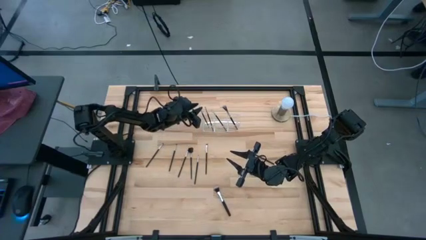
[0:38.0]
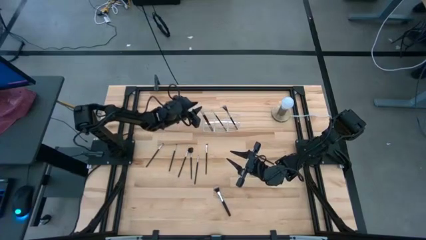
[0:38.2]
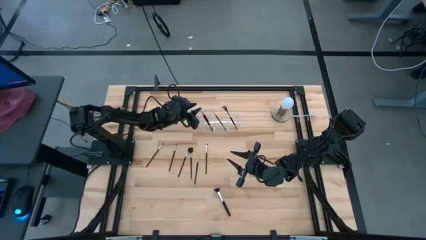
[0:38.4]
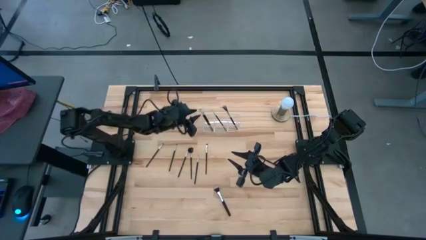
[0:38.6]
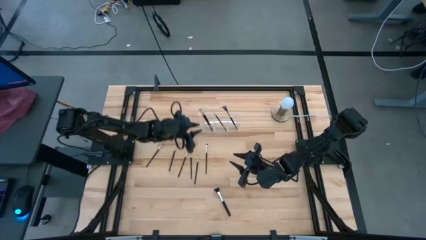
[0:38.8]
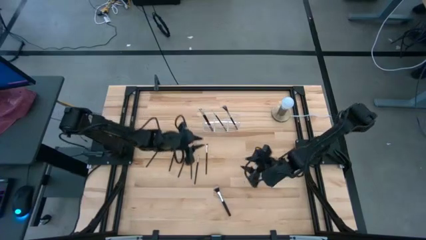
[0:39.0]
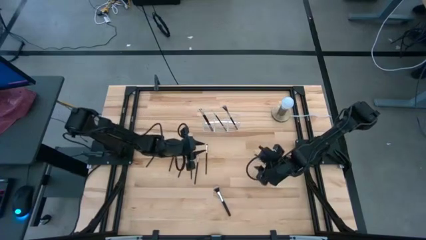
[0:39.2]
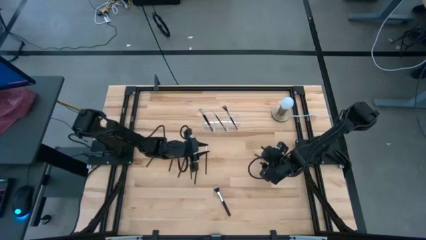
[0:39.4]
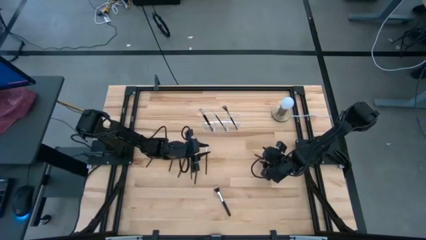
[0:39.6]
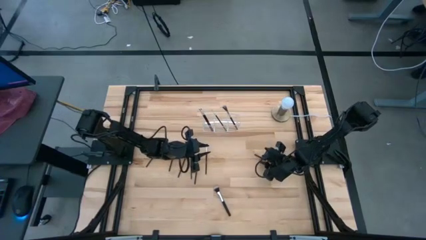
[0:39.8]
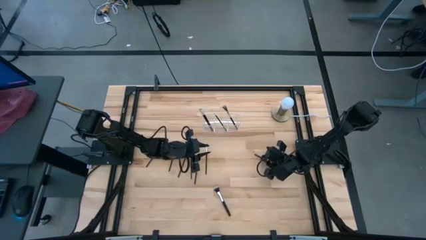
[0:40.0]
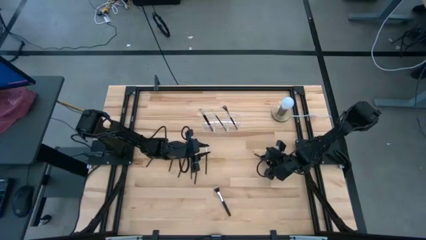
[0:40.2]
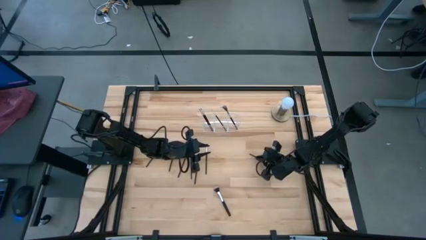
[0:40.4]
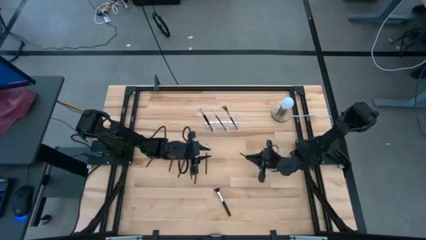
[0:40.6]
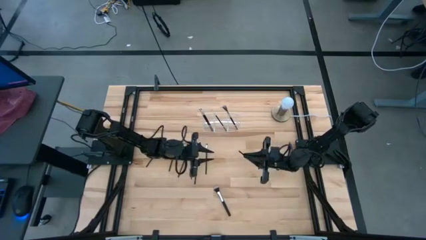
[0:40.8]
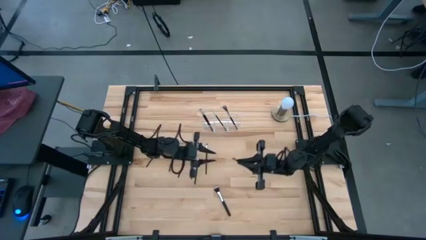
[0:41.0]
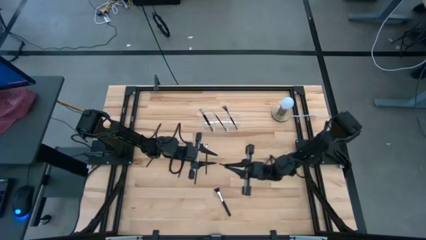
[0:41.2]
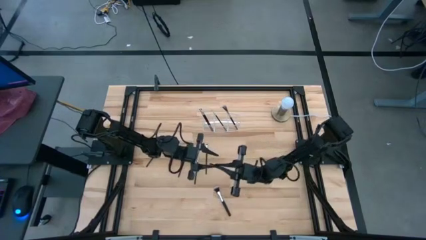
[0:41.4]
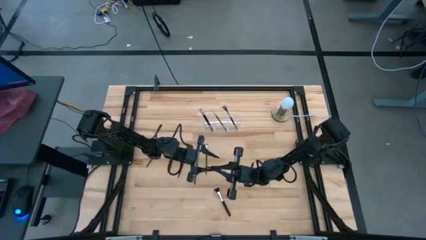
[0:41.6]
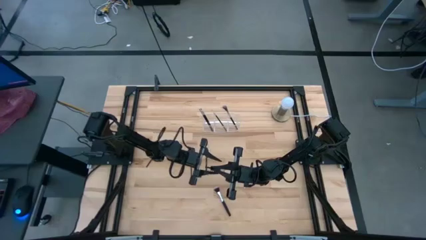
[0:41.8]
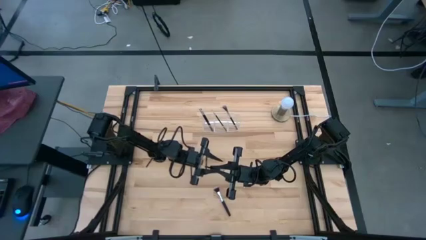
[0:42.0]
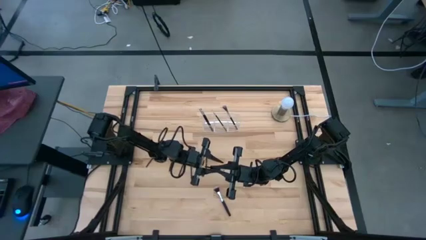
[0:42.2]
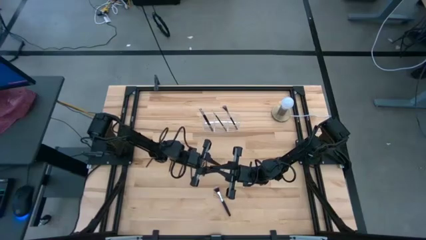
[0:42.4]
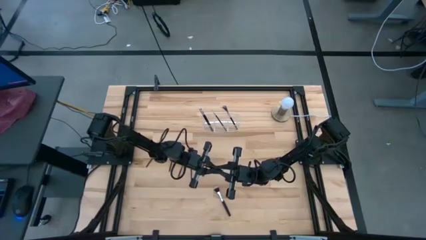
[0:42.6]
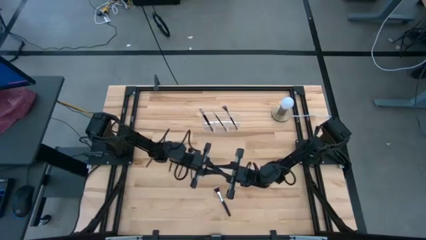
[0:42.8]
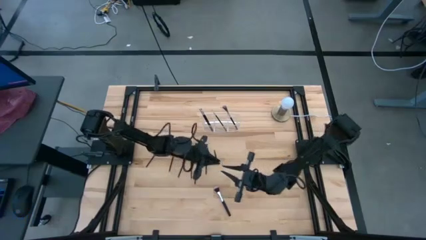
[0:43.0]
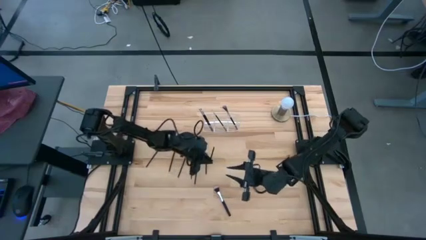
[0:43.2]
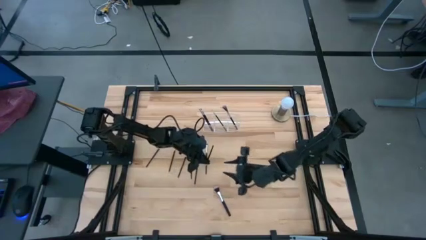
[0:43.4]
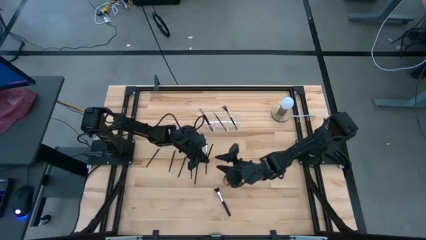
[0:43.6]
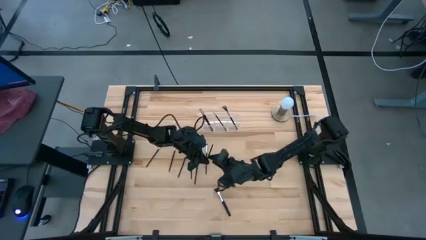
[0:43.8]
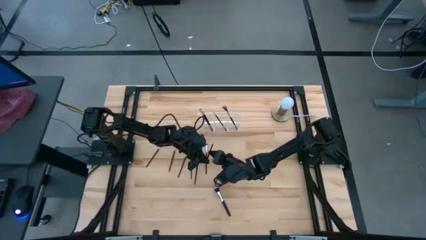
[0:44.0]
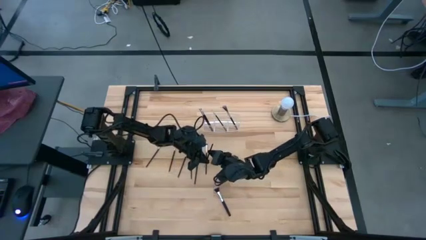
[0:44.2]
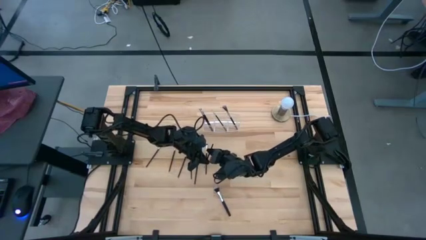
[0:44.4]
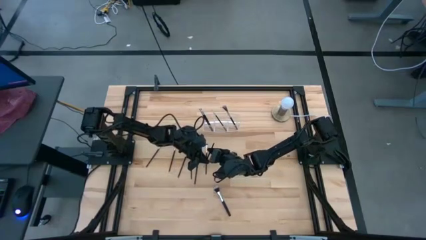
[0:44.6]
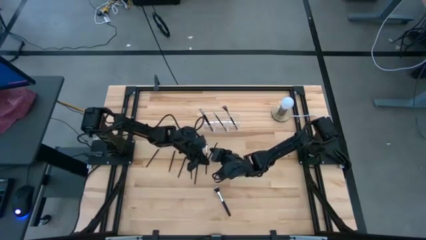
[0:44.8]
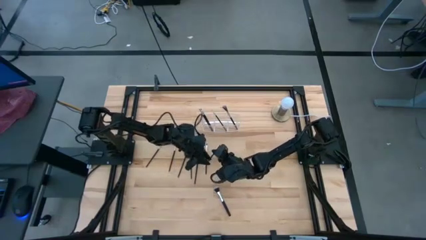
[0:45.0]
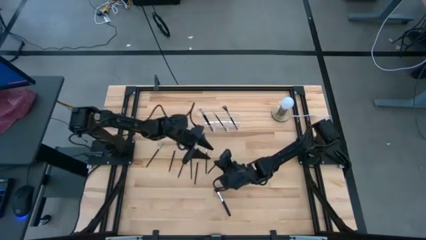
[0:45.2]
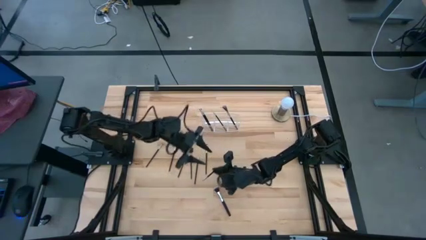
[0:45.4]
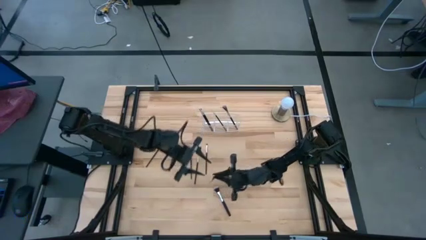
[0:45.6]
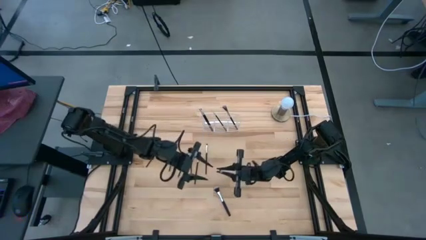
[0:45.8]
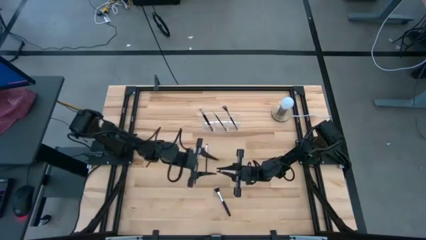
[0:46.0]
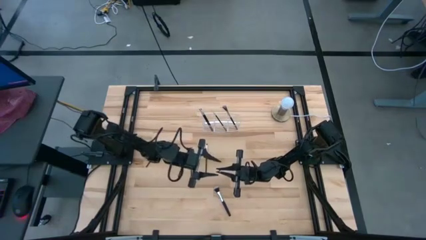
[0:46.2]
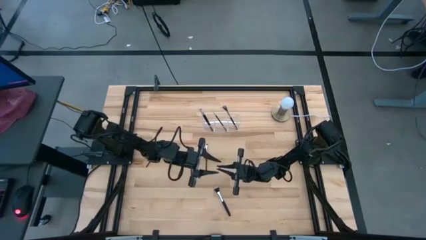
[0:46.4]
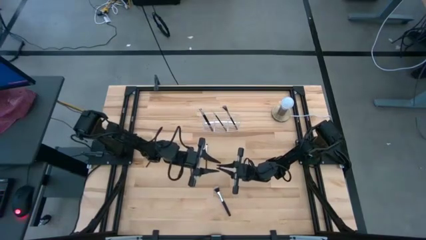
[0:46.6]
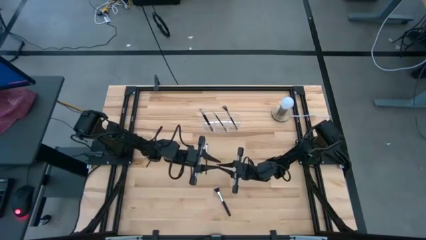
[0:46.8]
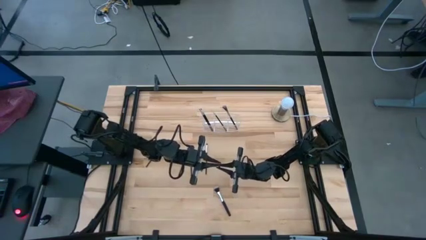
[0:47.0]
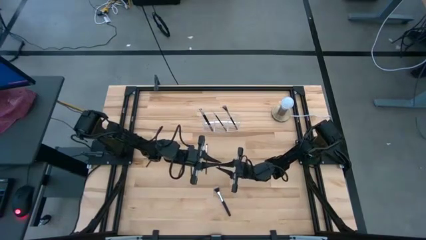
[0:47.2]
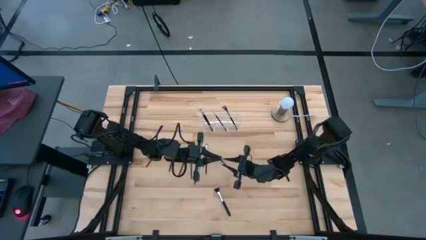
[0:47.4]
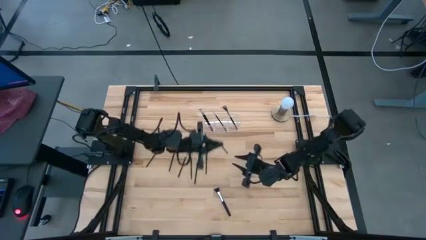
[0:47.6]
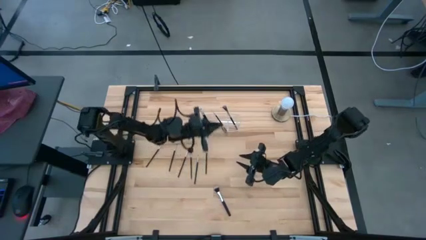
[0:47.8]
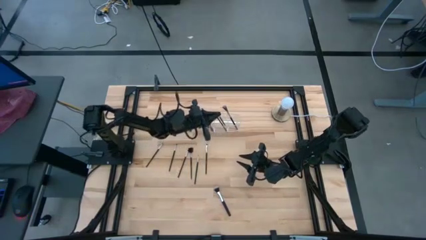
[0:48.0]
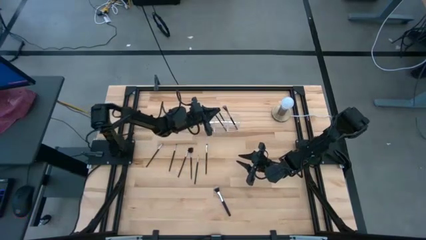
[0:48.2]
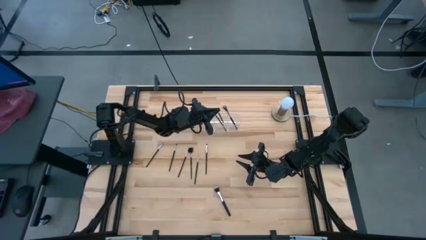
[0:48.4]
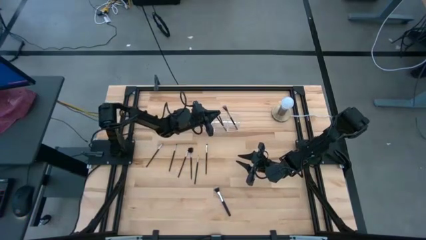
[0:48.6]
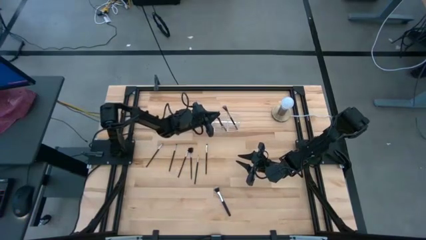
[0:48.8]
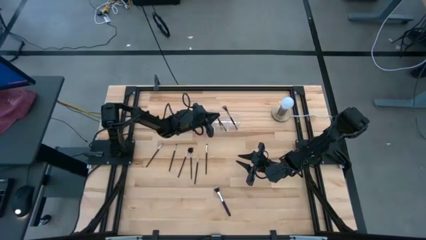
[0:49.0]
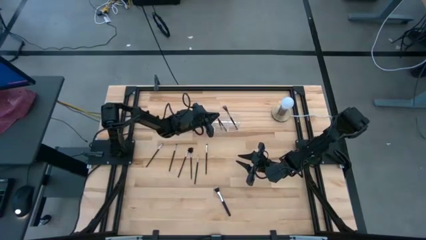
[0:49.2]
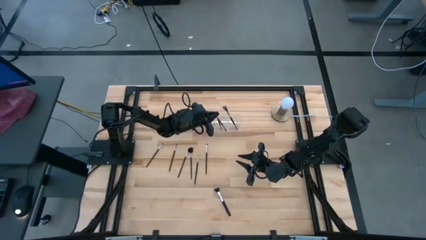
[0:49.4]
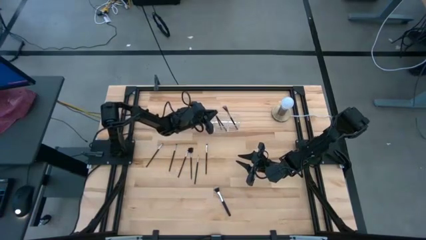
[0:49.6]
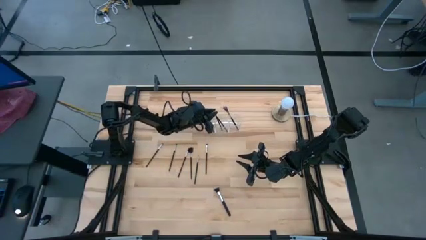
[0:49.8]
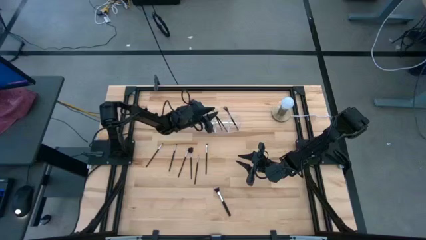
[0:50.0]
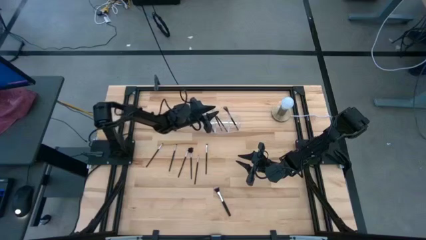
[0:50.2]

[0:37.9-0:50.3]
Task: Put items in baskets/containers
Put the black eyeshadow brush into the transparent organizer

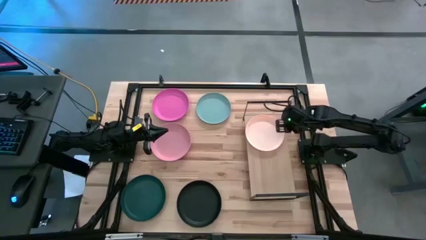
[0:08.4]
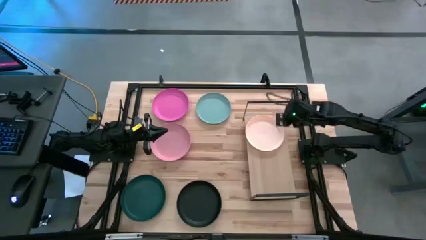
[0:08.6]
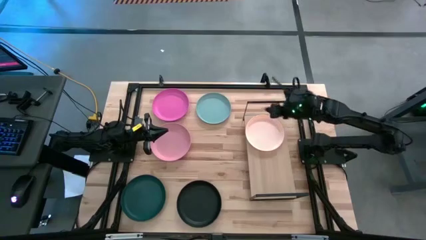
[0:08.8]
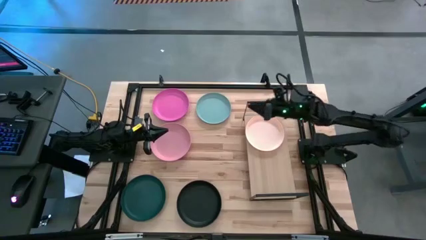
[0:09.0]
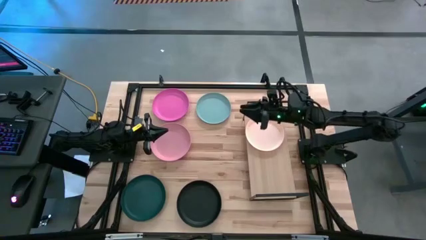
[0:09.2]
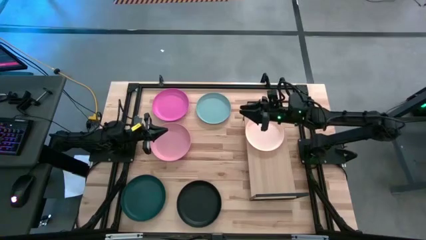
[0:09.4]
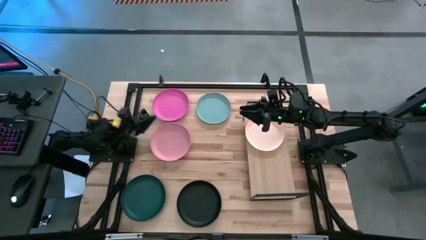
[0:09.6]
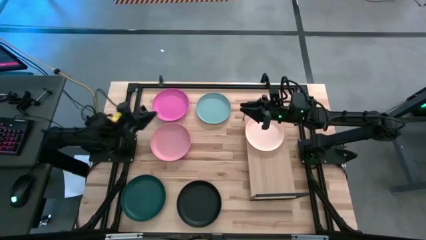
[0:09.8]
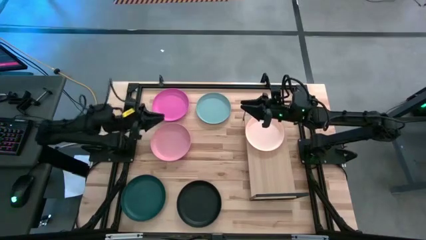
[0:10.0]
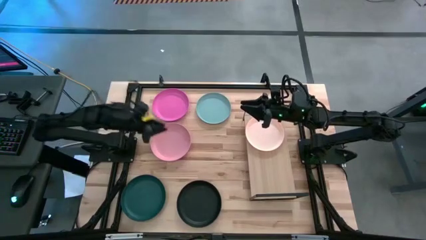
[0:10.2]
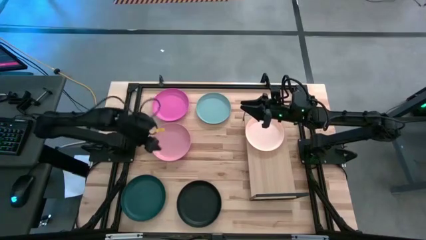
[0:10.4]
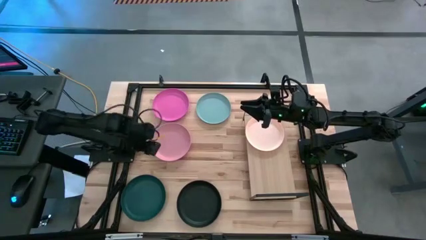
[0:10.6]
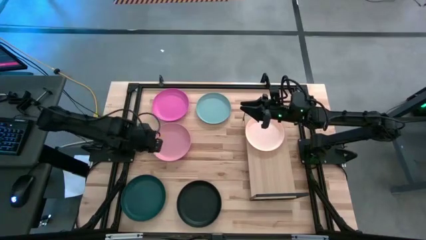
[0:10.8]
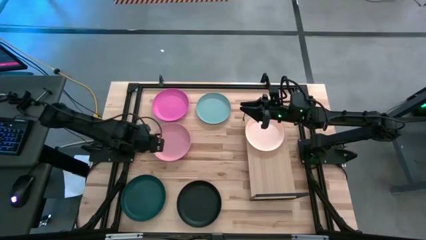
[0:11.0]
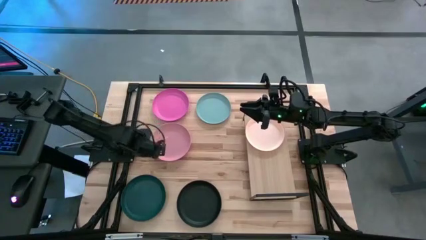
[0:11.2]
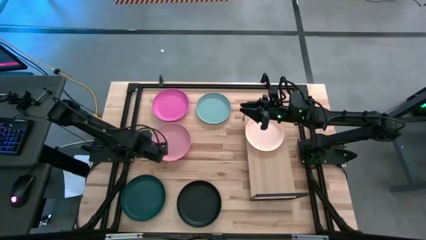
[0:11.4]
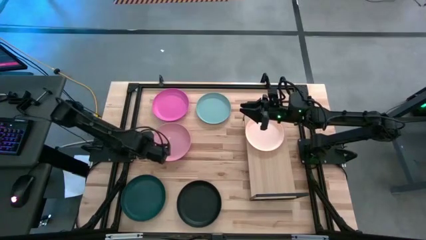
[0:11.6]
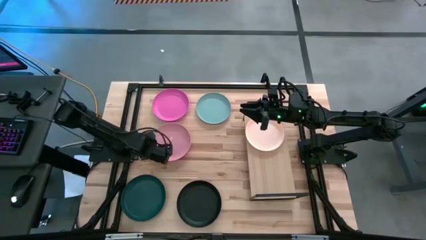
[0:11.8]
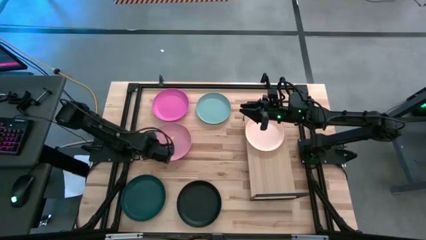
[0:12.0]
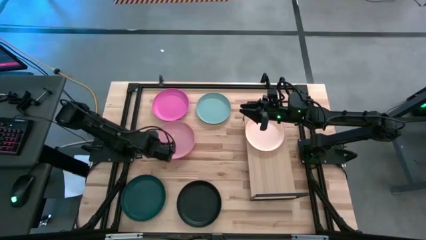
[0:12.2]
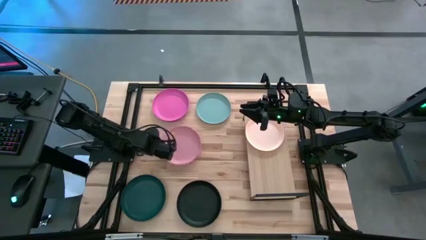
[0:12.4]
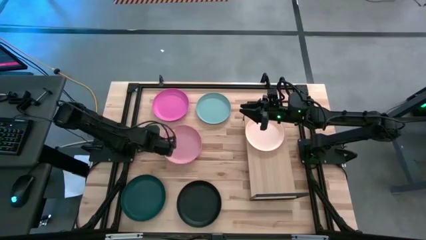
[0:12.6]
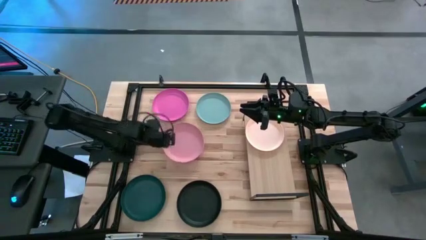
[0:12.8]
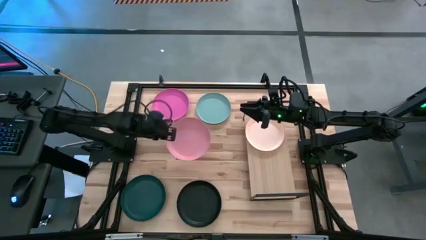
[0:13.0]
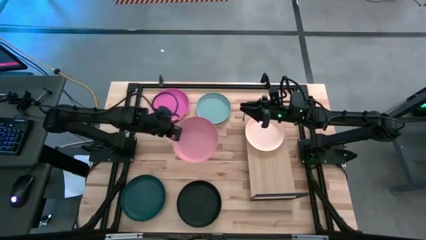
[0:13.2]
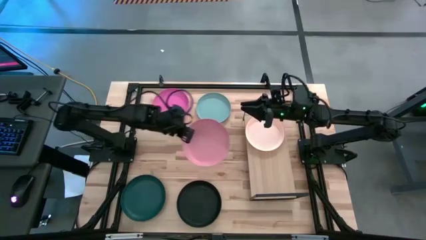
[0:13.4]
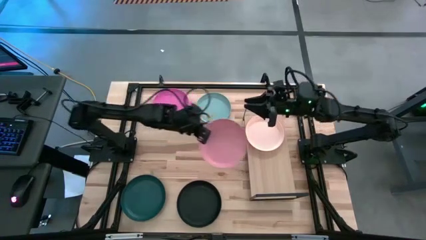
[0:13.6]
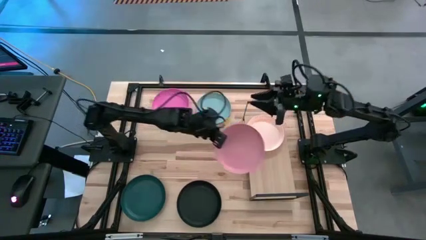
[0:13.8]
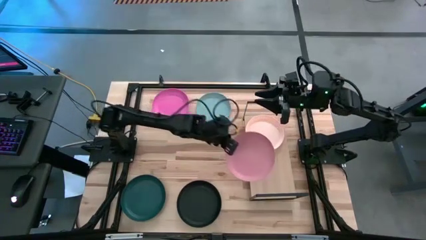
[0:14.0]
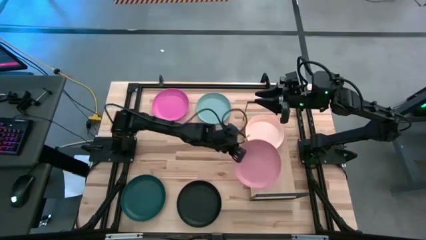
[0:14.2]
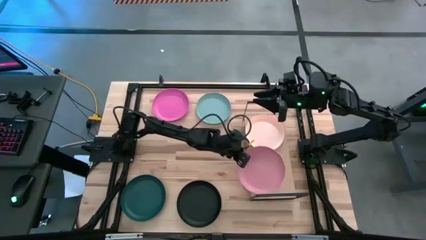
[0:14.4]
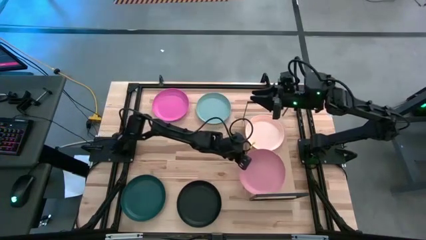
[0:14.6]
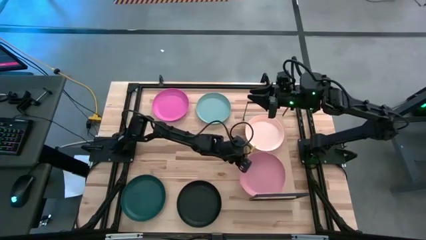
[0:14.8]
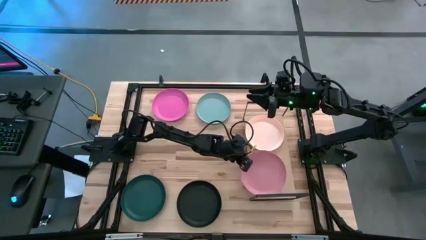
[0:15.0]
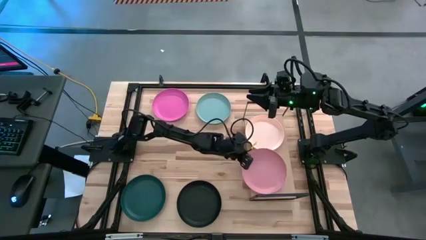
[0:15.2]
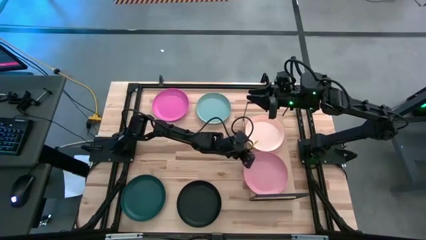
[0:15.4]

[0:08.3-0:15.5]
Task: Place and stack plates onto a shelf
Put the light pink plate on the shelf
